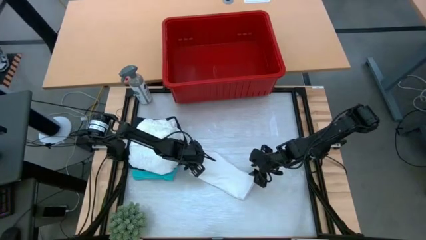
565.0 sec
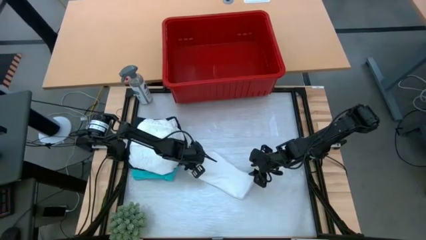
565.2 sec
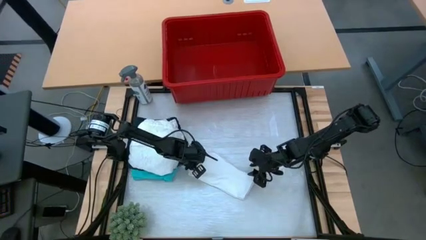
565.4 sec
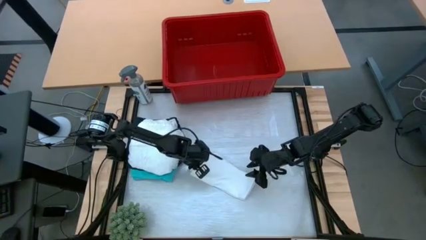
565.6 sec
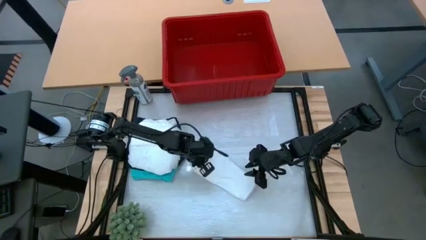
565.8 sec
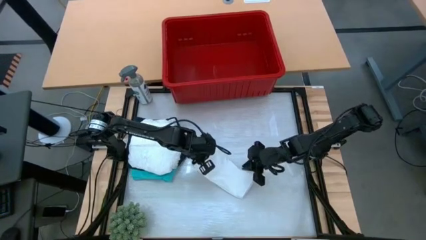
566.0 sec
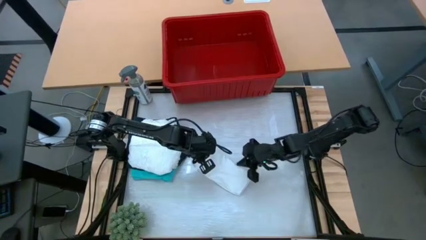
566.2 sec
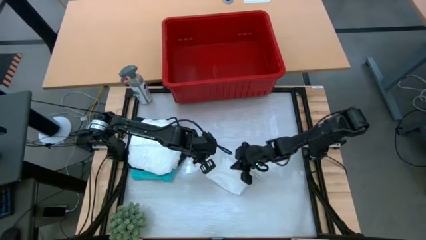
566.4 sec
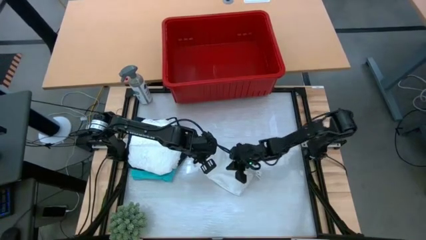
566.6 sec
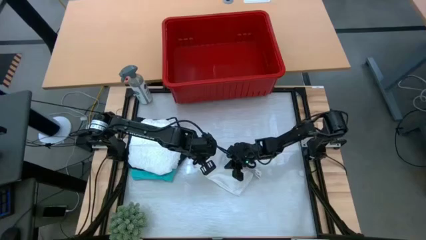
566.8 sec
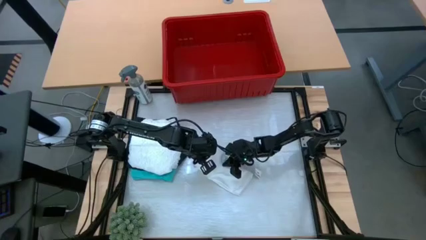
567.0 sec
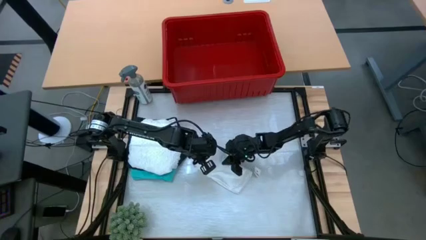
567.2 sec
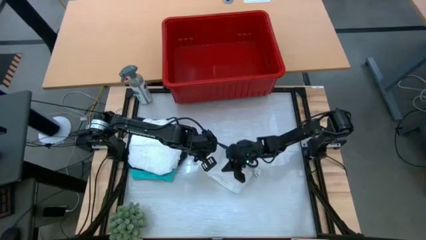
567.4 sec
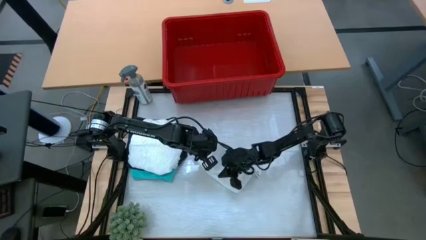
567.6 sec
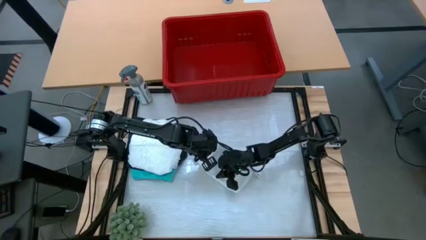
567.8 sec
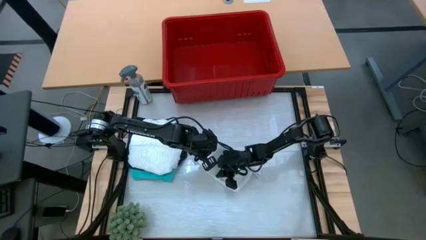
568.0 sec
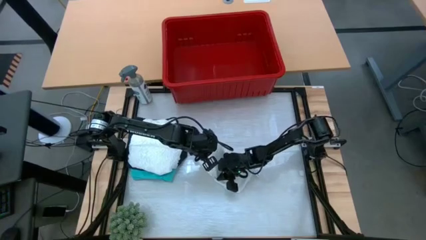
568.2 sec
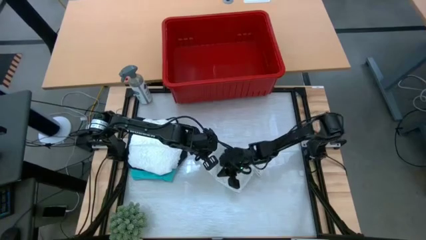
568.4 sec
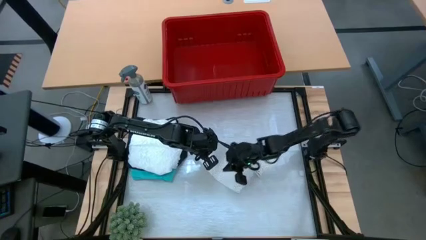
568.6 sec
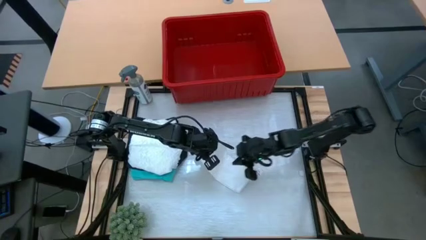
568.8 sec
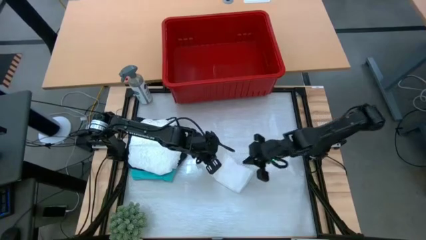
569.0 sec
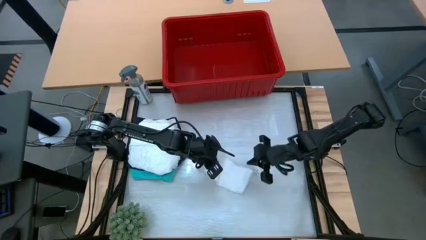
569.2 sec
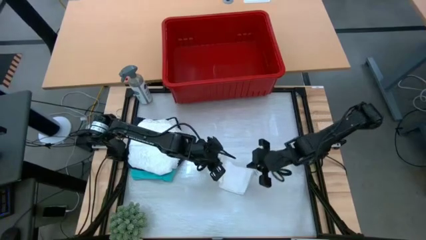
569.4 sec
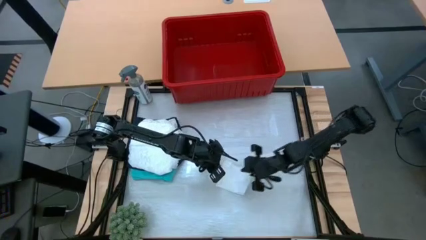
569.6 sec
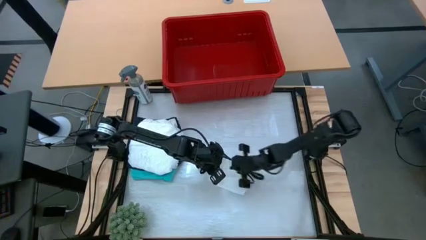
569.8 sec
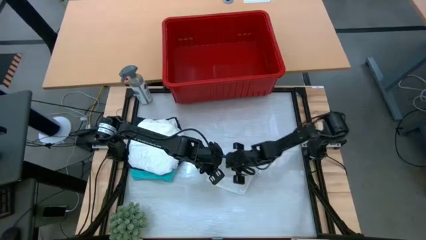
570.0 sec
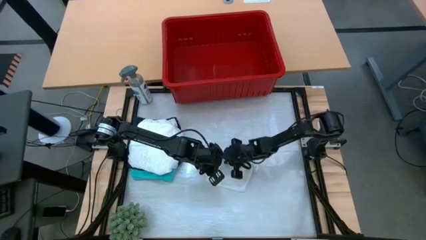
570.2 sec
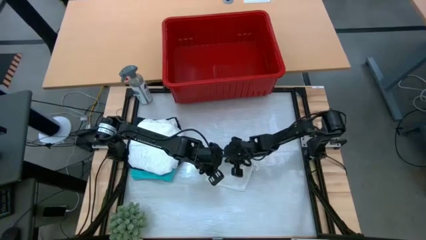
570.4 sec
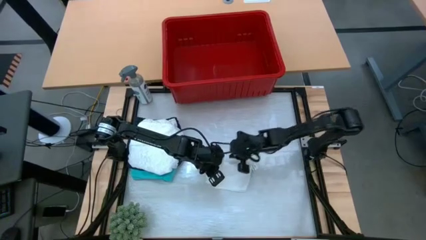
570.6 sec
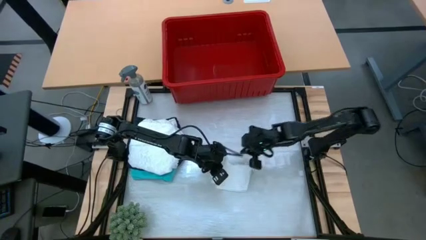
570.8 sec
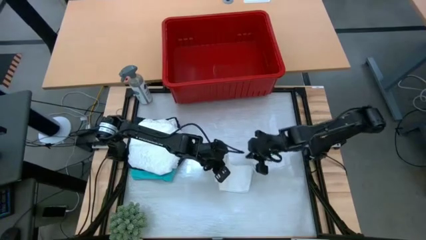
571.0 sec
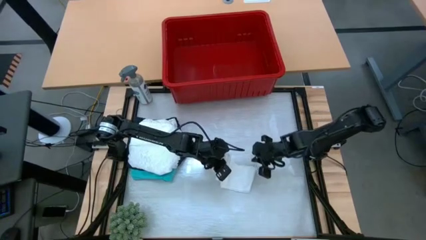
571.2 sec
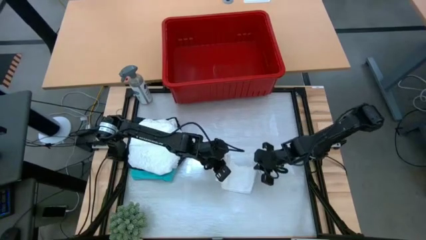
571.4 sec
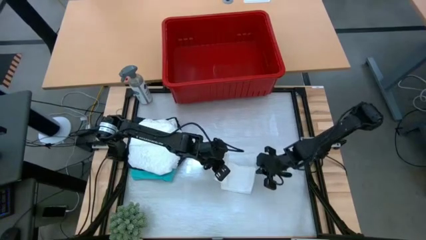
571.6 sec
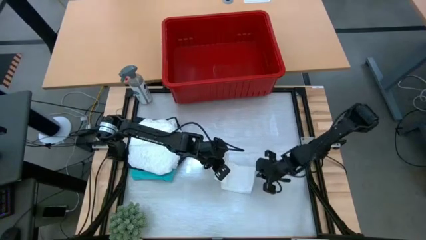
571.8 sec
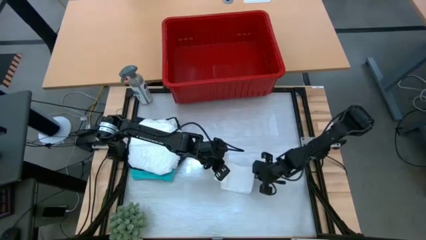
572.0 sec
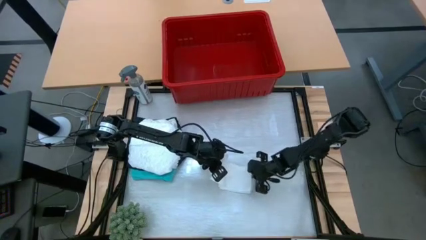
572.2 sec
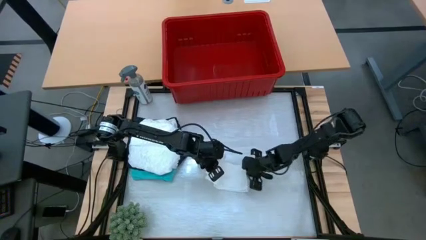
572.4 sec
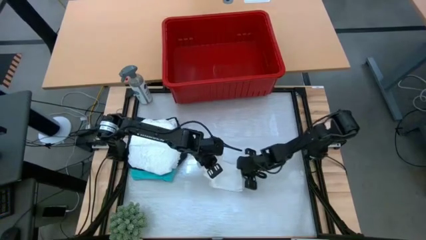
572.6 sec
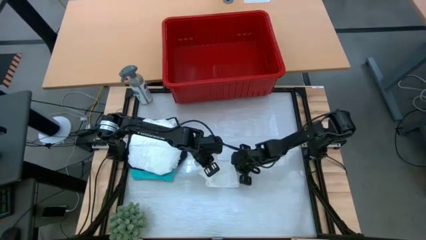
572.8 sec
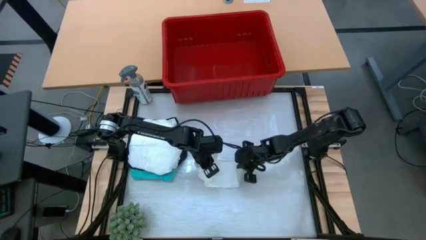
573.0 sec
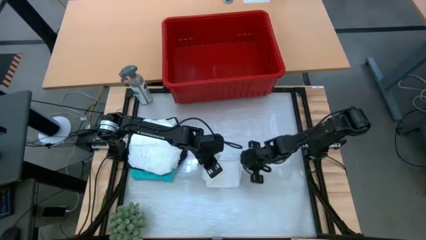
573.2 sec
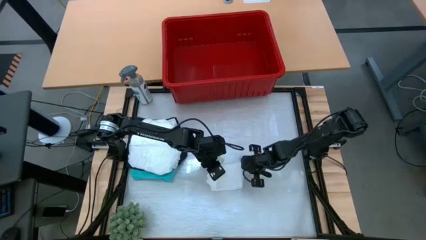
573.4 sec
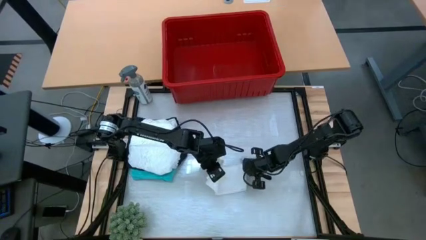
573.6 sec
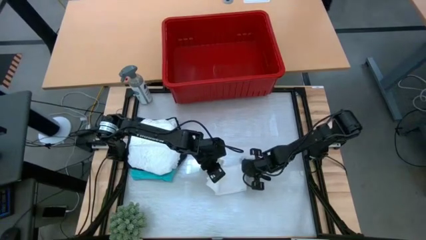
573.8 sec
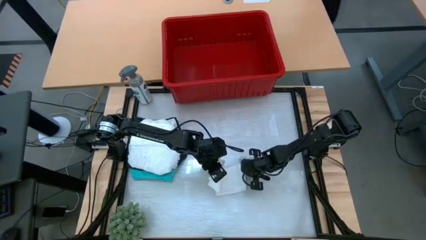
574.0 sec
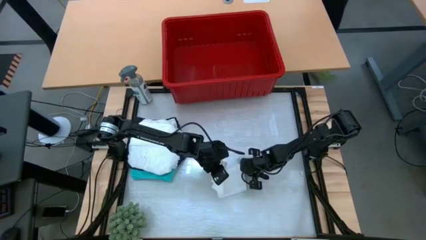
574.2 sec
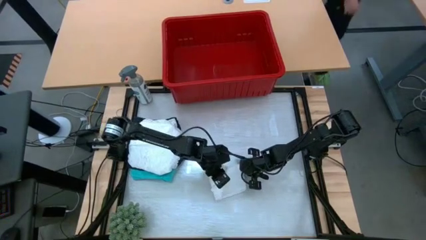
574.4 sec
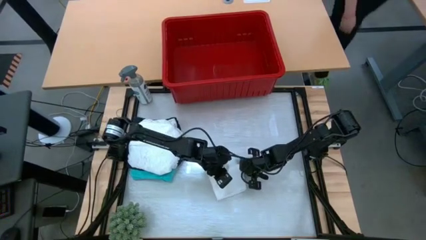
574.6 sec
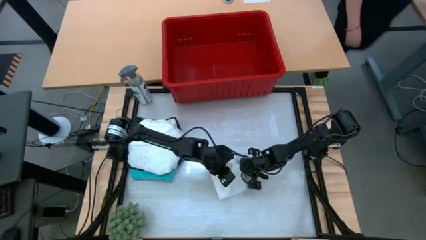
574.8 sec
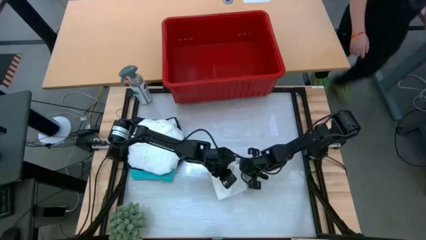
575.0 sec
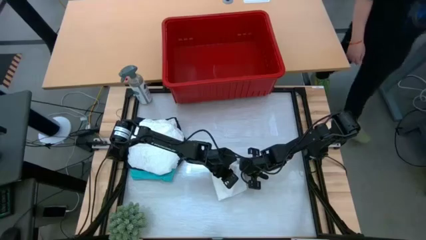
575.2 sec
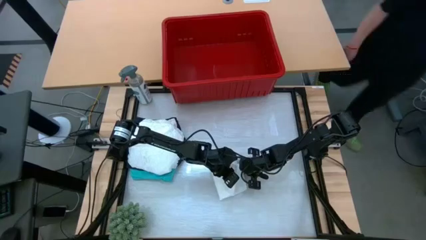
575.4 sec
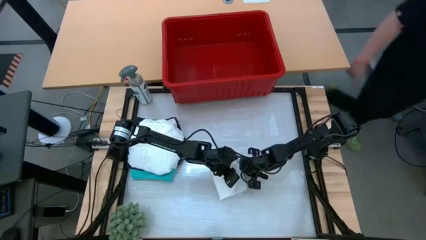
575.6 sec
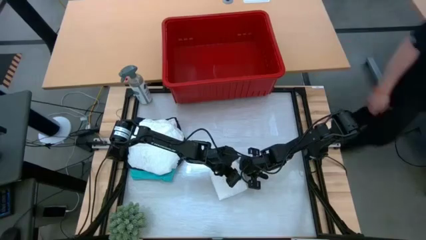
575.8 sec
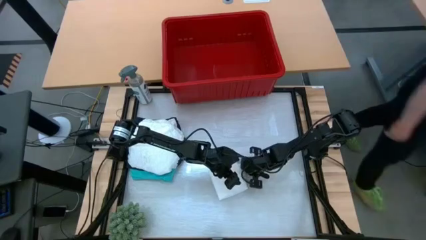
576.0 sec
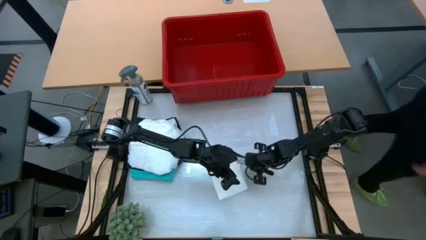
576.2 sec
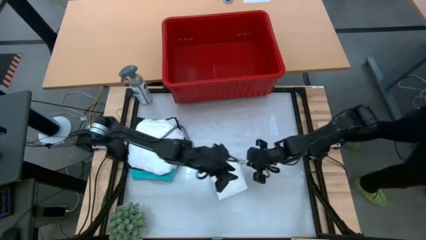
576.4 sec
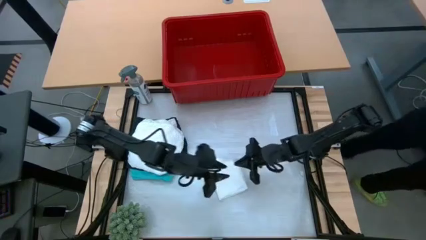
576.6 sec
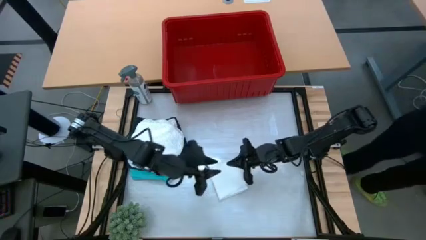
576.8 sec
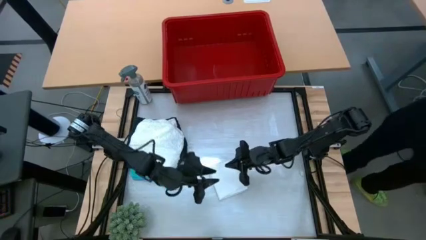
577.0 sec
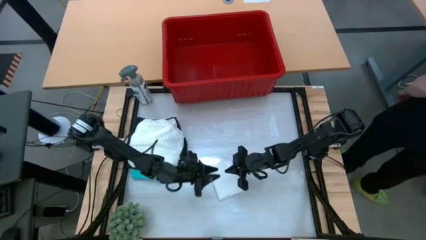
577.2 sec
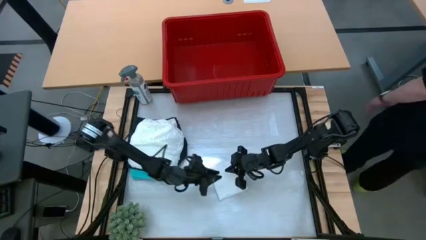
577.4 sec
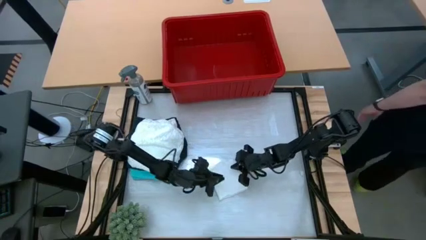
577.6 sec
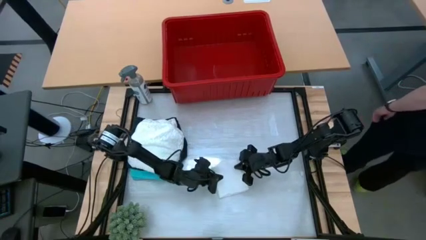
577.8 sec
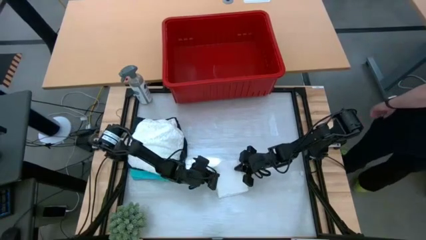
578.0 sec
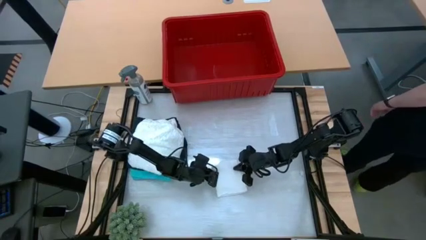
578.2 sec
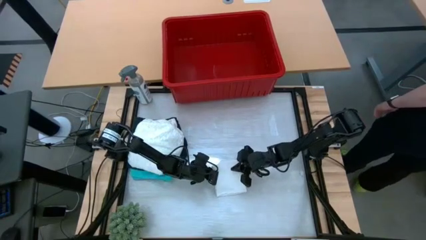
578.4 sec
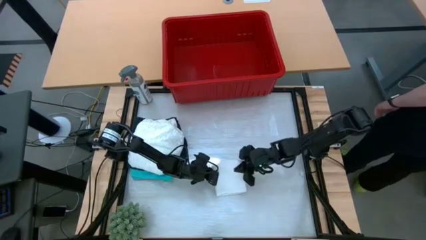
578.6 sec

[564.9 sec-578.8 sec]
Task: Fold laundry
Fold the white shorts

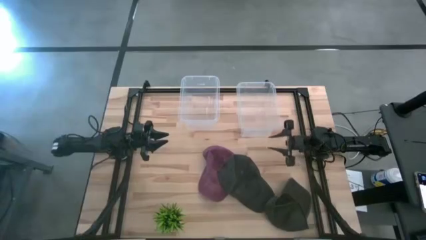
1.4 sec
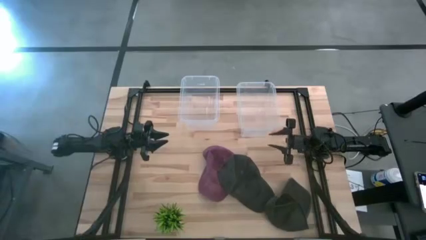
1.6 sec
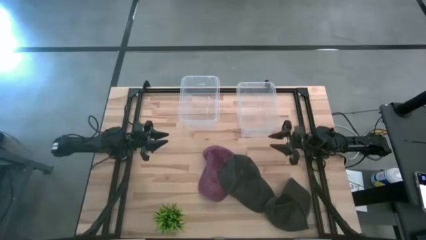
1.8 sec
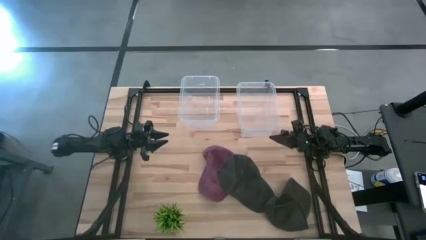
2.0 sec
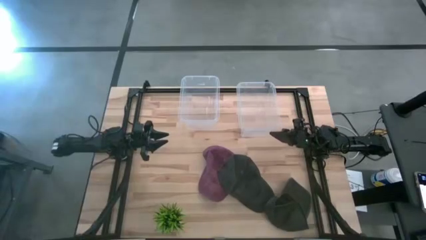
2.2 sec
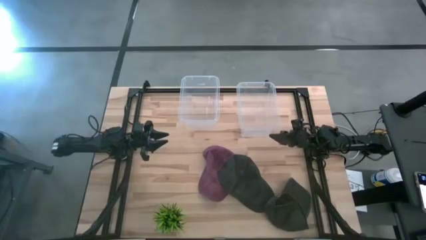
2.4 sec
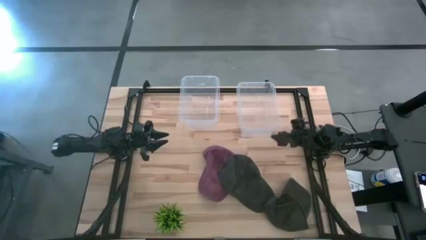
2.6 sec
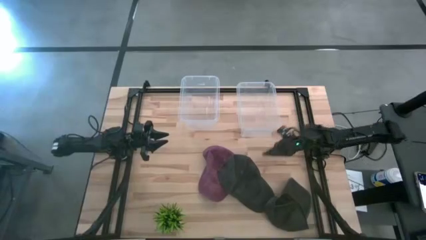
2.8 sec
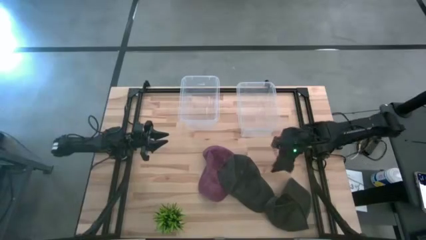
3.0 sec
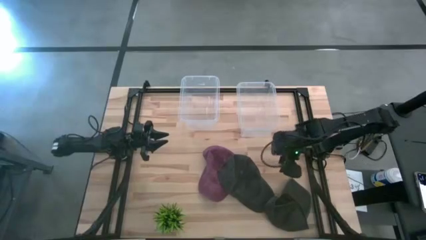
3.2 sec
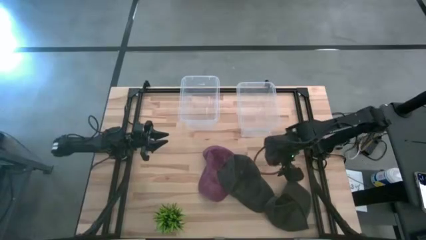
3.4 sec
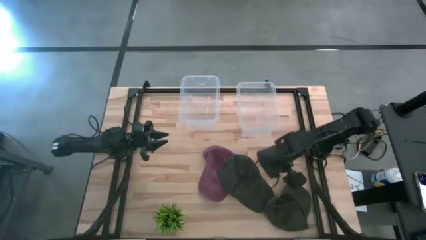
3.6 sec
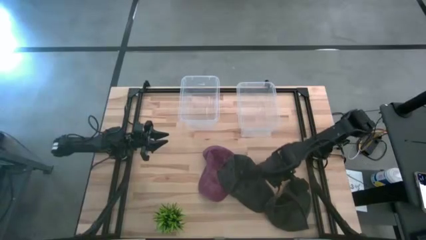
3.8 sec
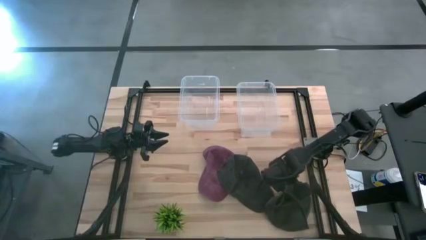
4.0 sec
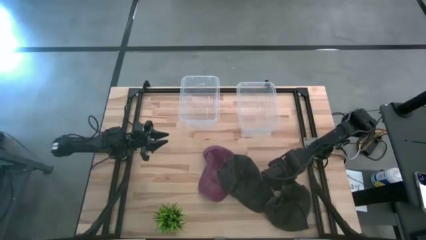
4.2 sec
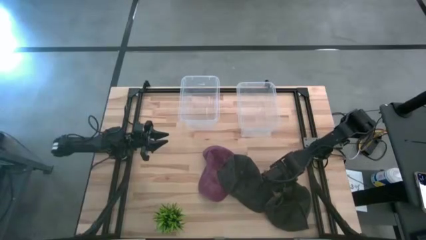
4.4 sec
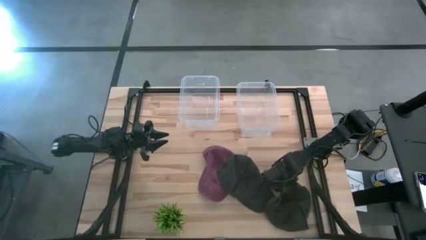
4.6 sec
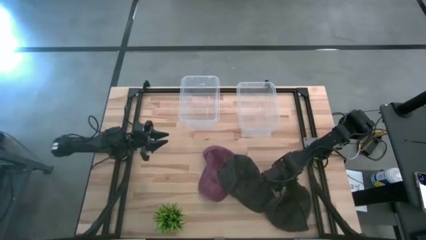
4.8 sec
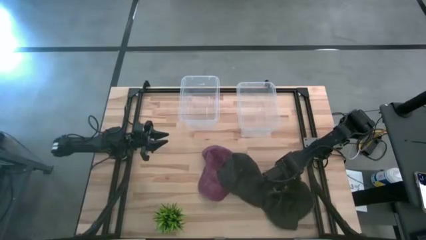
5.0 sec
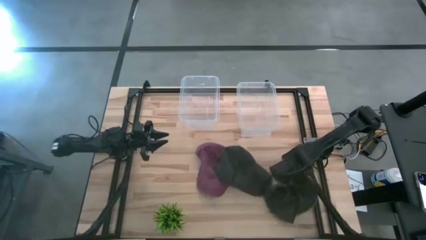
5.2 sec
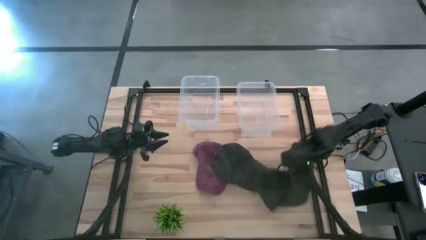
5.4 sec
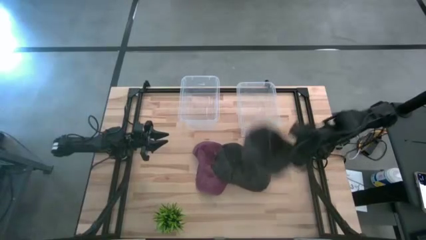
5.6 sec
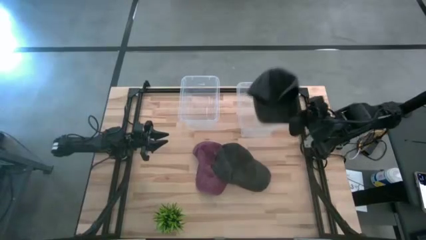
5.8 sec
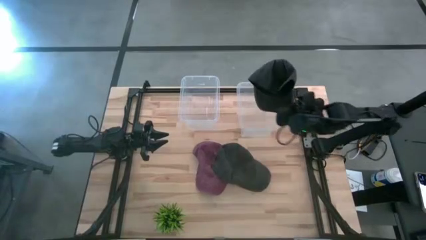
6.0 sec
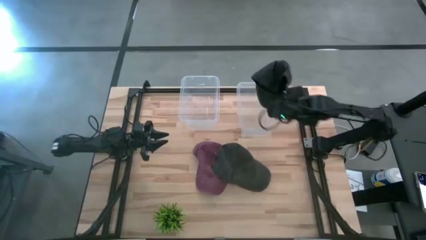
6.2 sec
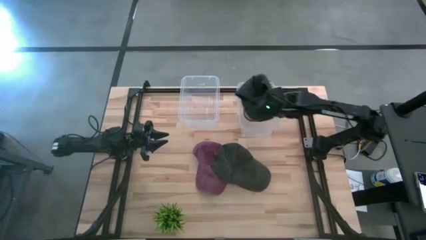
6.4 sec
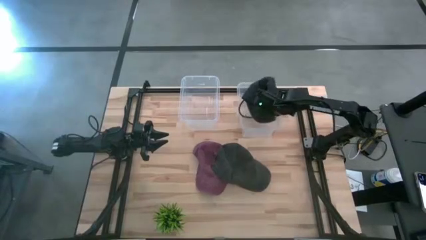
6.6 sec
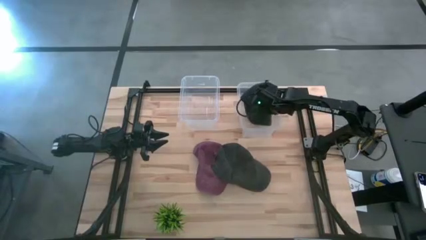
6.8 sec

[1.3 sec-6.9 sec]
Task: Pick & Place hat
Put the right black cap into the right transparent bin
